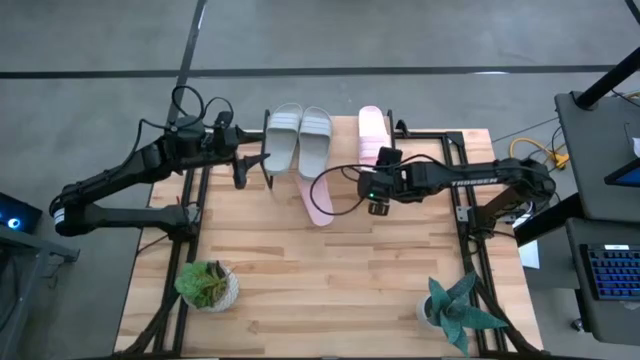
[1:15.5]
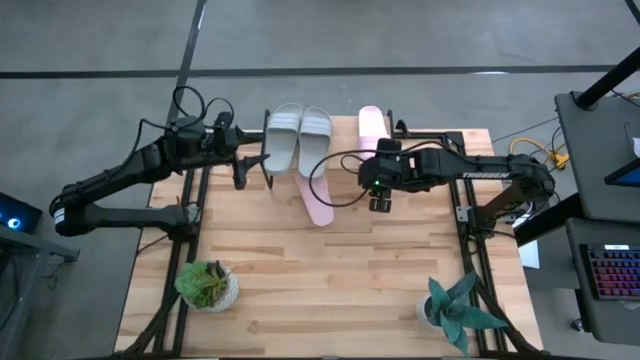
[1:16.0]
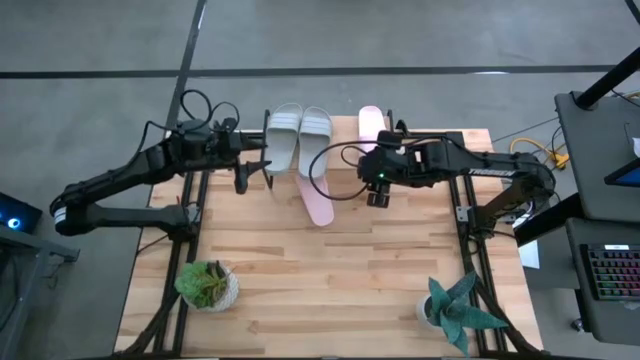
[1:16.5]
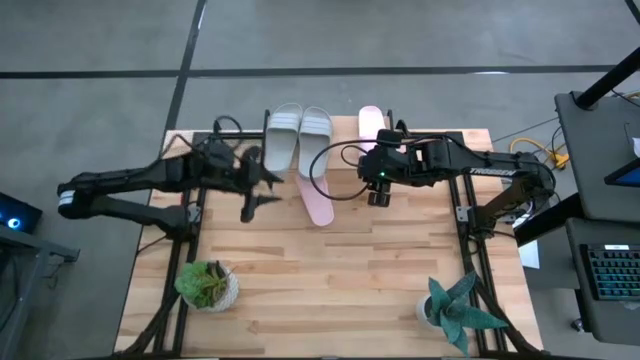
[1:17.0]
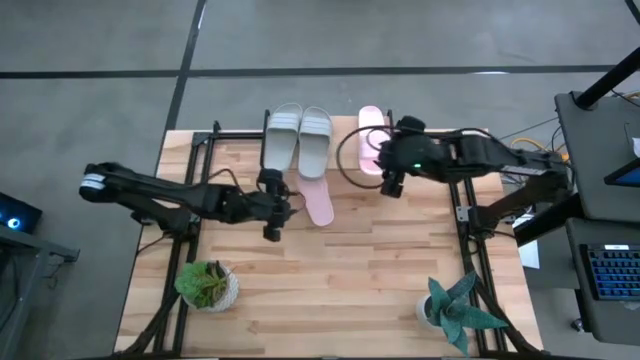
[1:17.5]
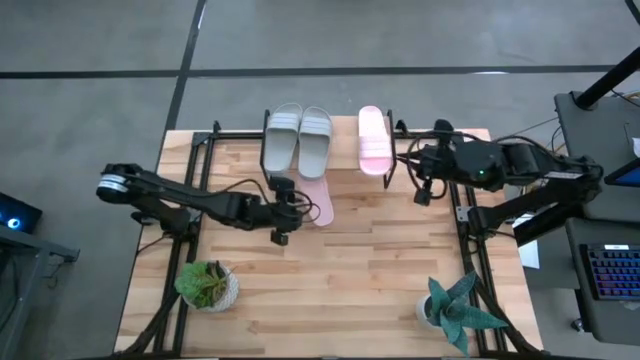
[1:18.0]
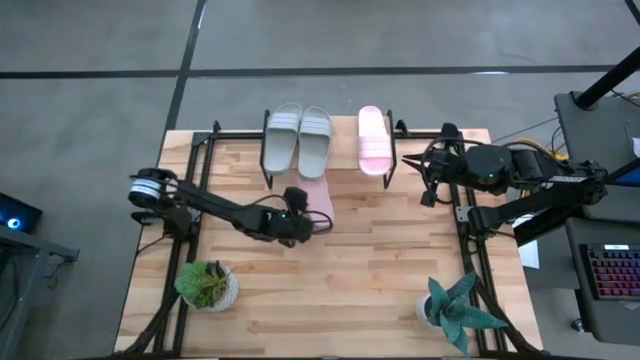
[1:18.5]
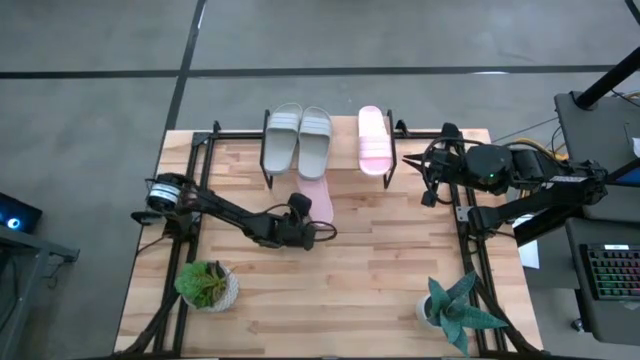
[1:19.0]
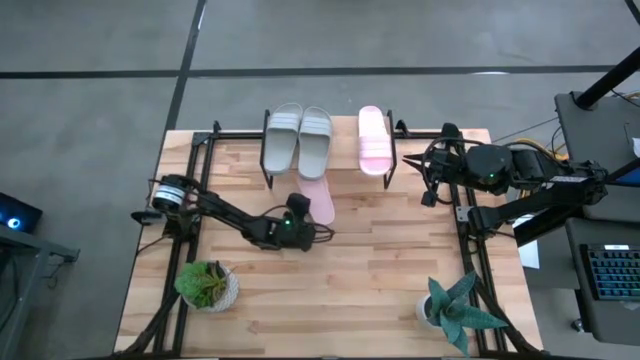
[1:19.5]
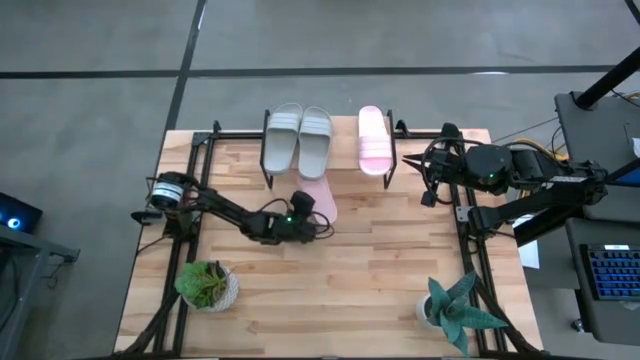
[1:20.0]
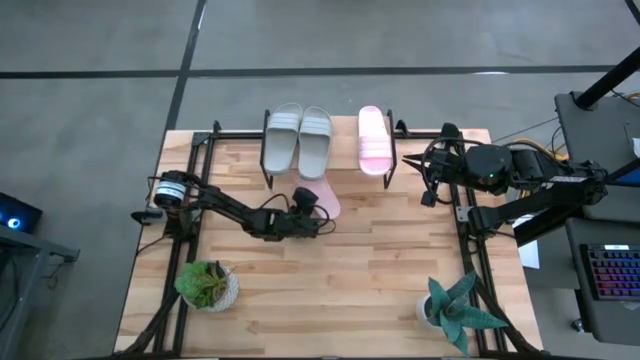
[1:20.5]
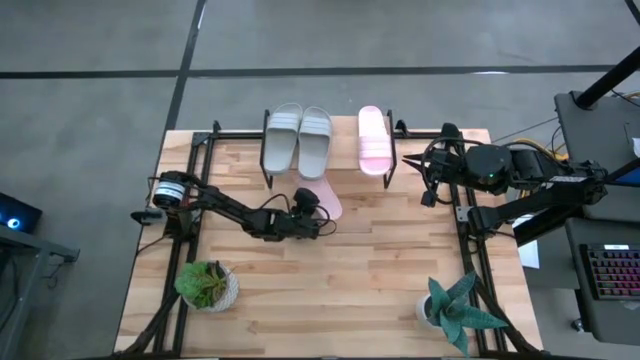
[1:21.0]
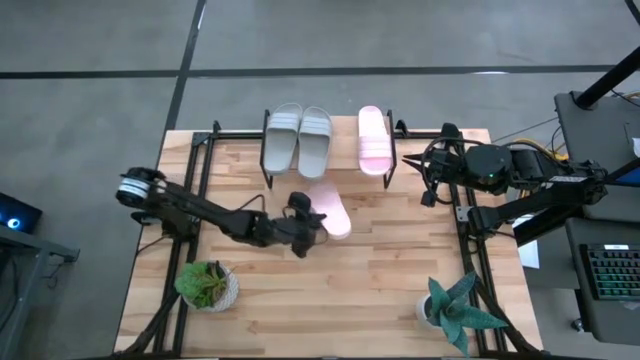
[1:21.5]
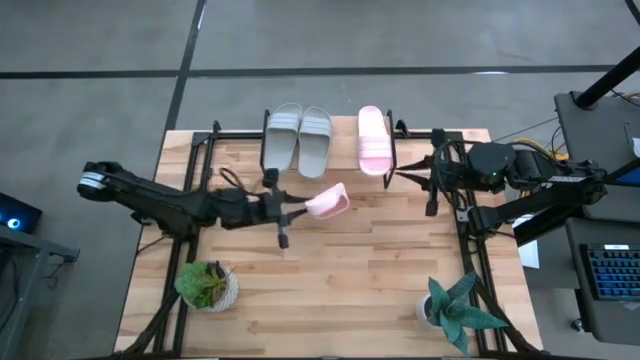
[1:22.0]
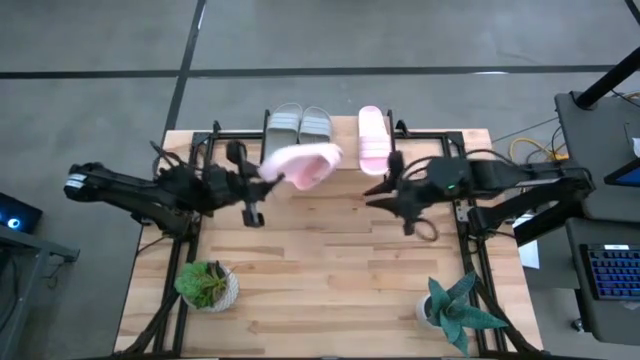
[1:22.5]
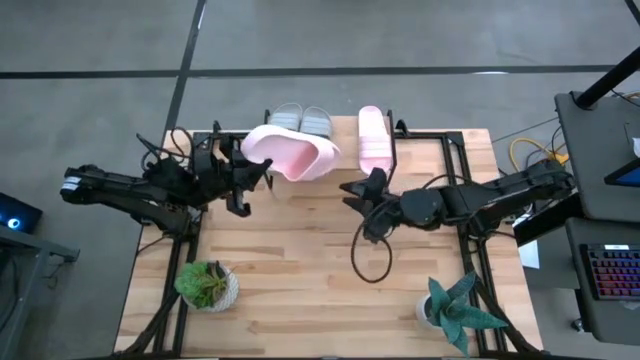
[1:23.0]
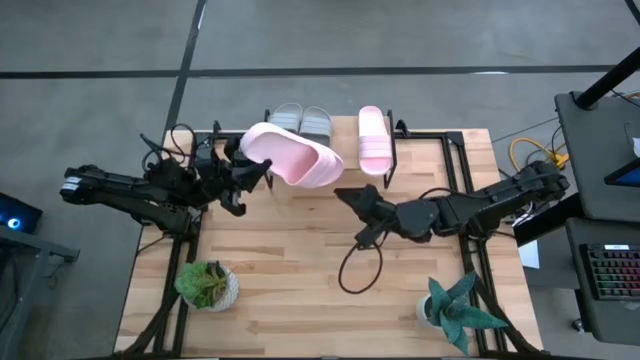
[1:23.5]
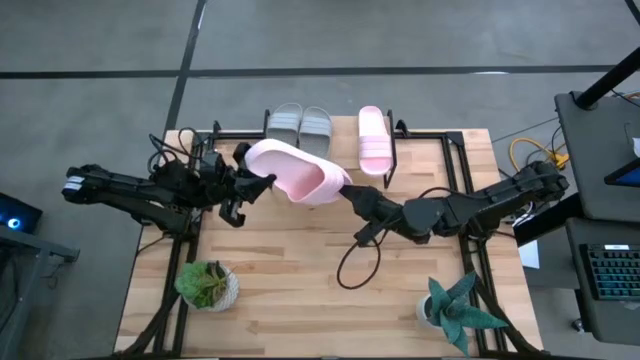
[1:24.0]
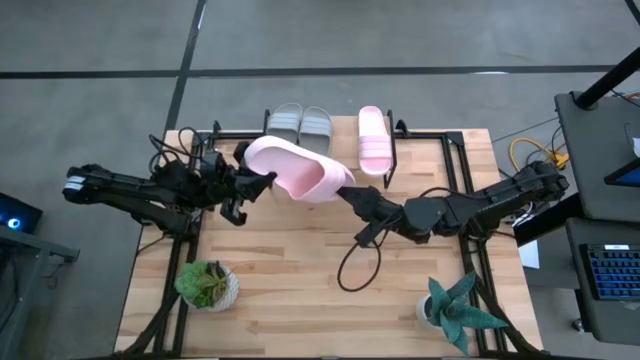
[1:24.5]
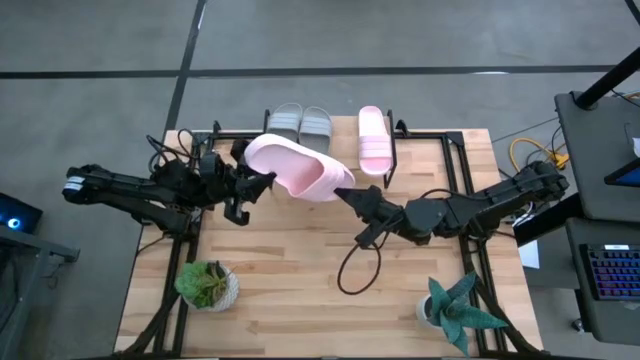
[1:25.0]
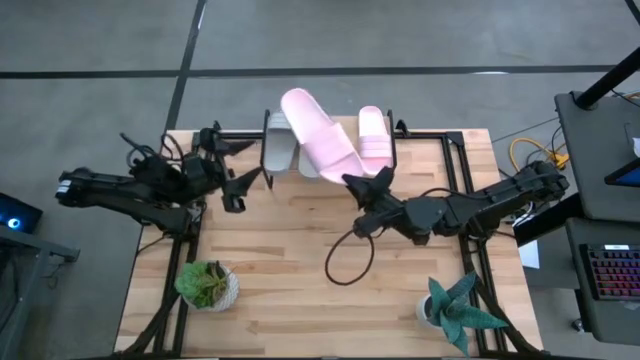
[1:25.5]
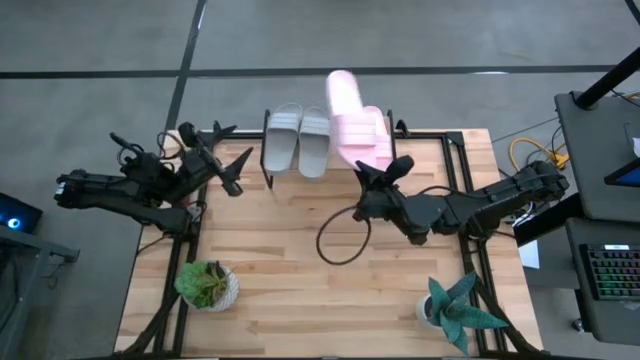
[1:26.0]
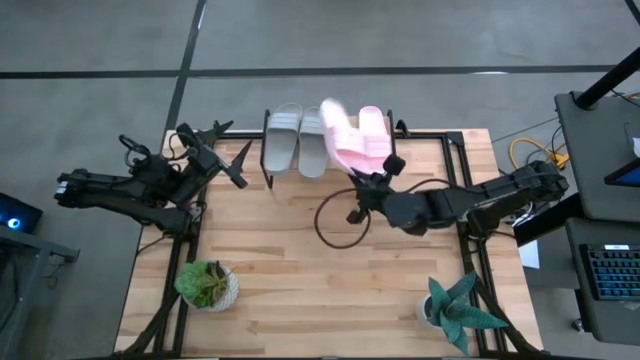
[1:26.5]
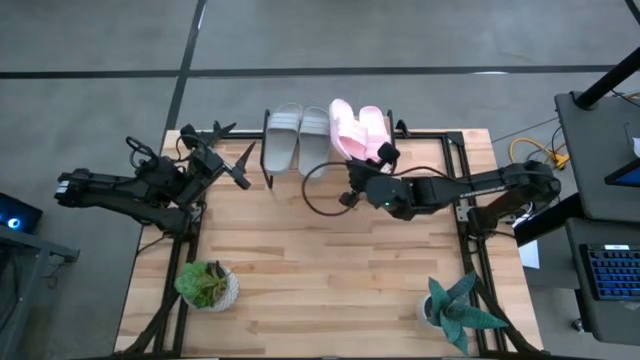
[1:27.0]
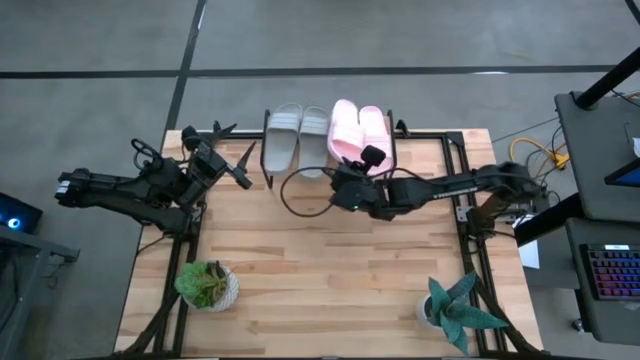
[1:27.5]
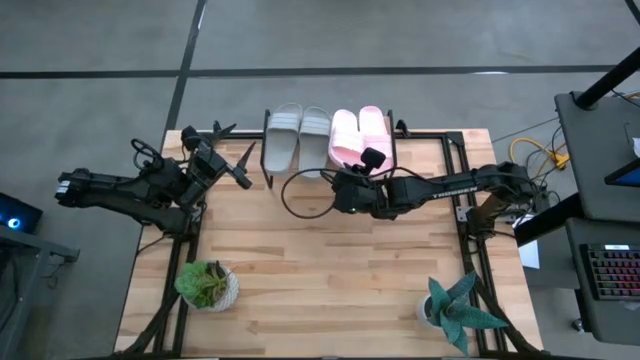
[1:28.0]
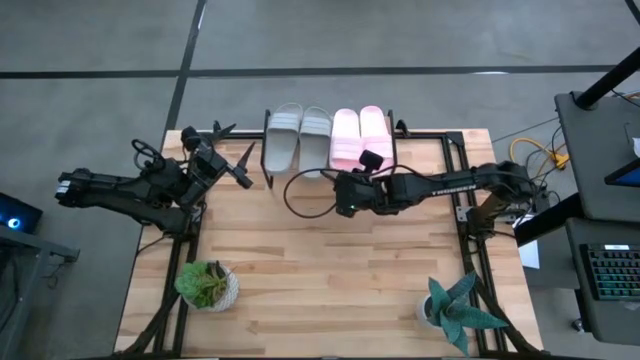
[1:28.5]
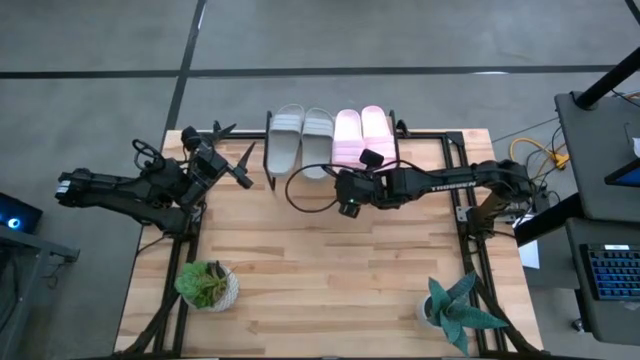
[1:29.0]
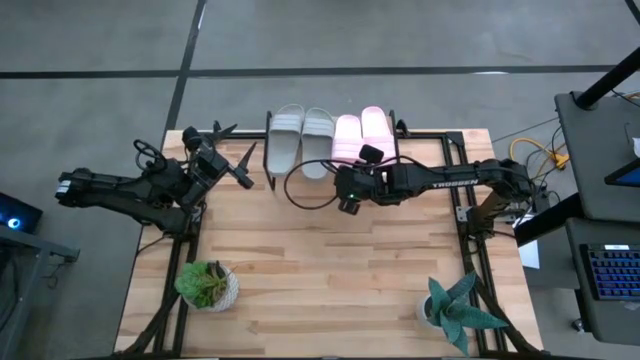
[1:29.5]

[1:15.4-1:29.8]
Task: Pick and place slides into the shelf
Put the pink slide on the shelf

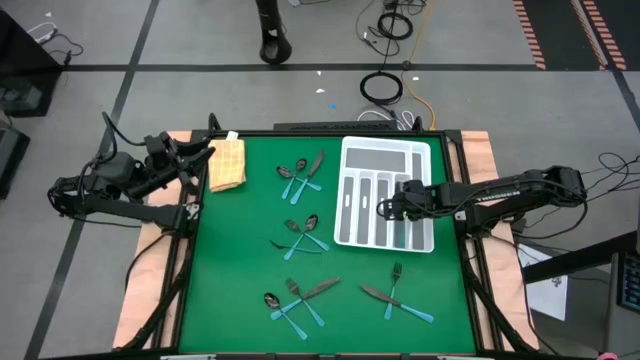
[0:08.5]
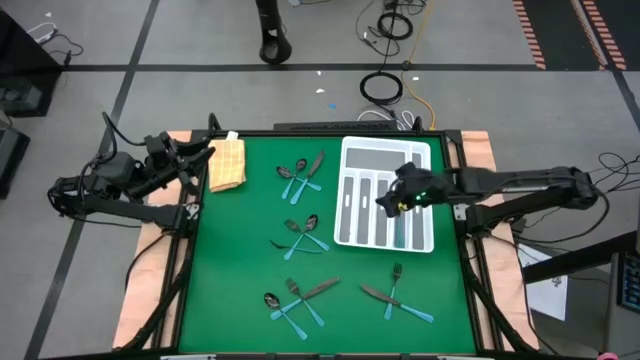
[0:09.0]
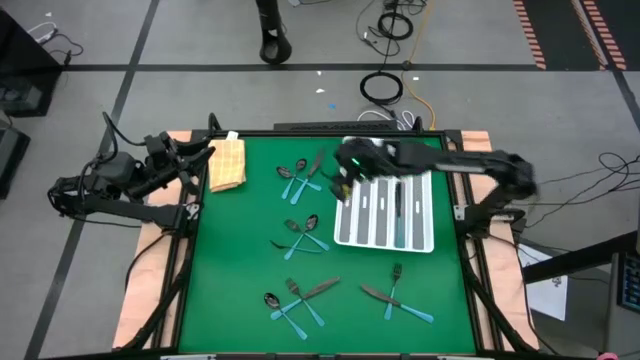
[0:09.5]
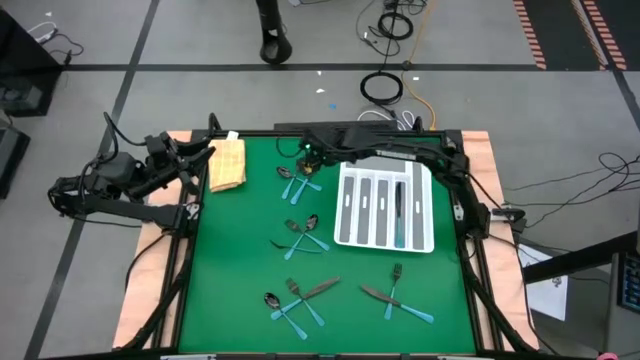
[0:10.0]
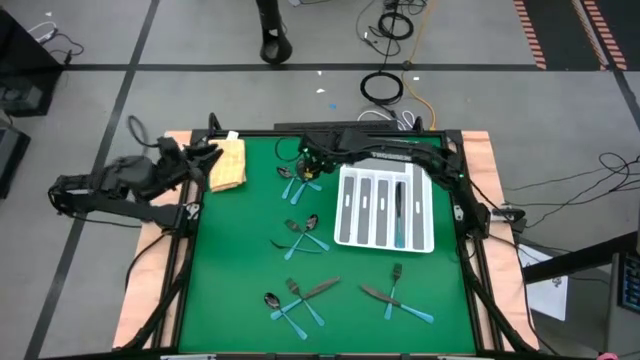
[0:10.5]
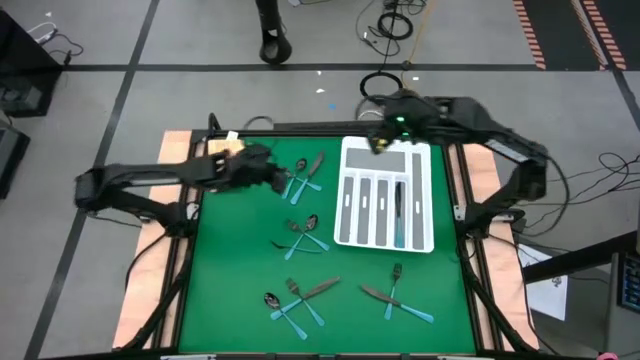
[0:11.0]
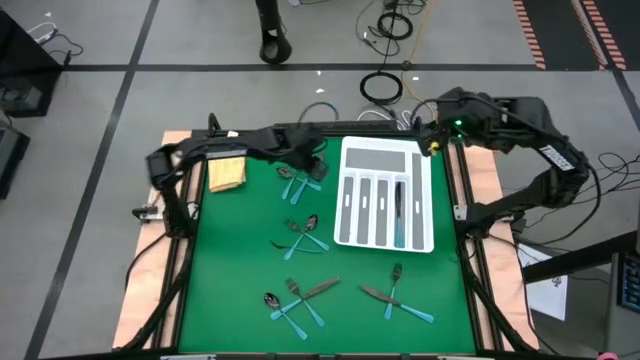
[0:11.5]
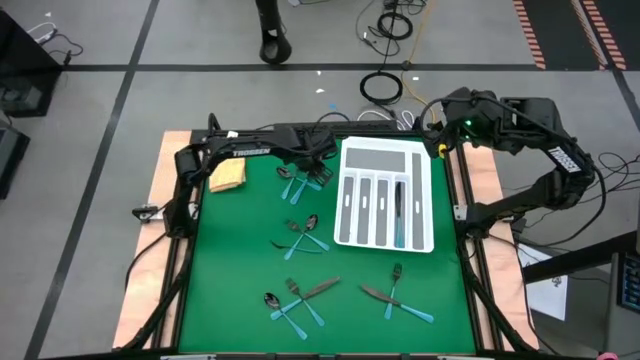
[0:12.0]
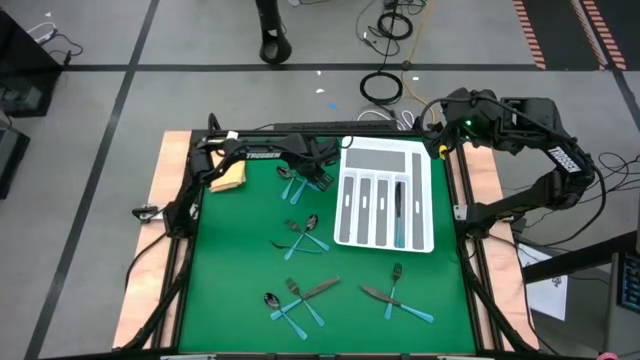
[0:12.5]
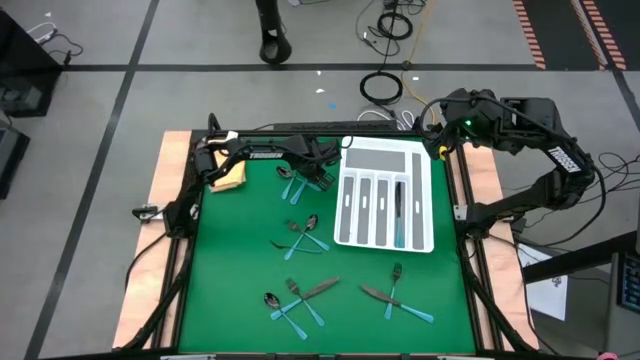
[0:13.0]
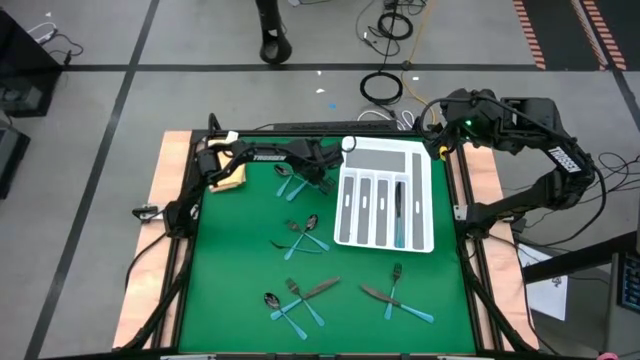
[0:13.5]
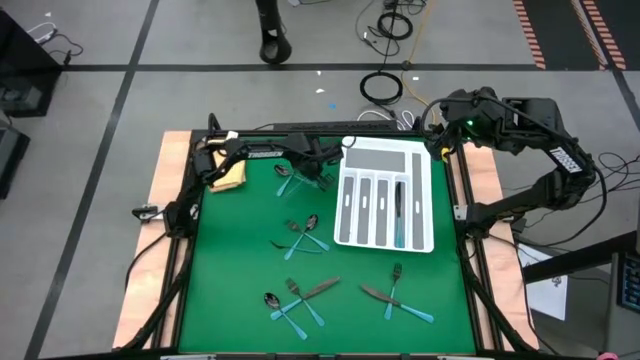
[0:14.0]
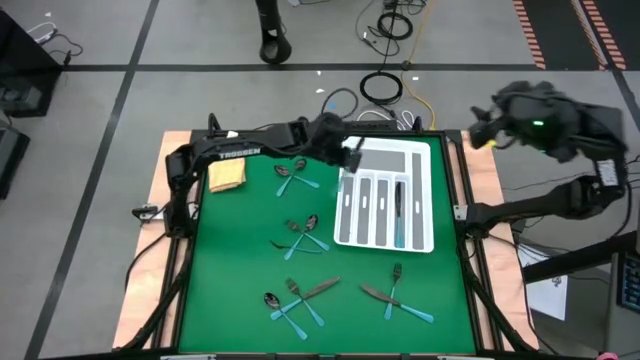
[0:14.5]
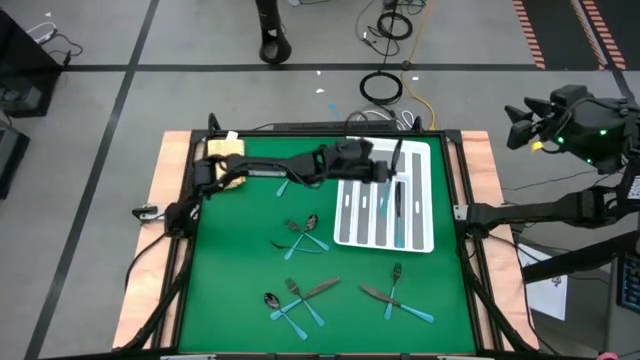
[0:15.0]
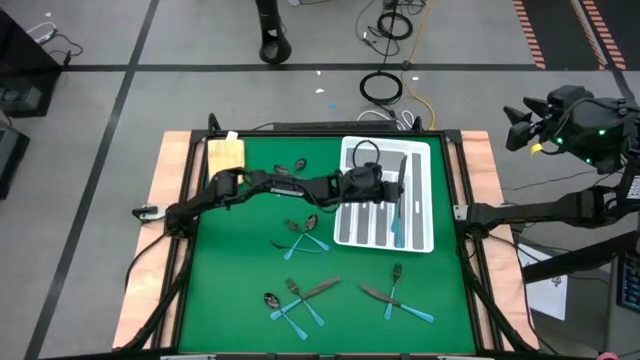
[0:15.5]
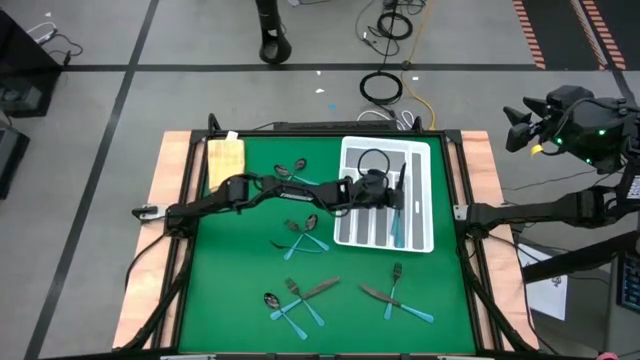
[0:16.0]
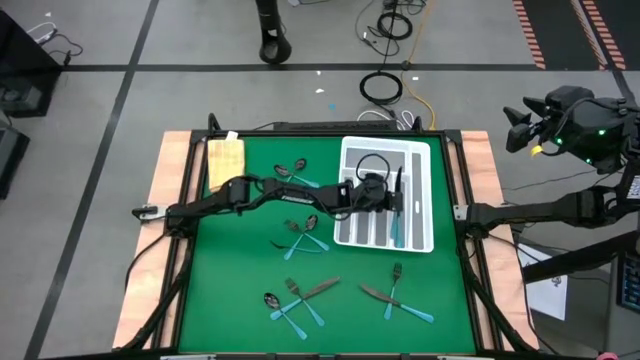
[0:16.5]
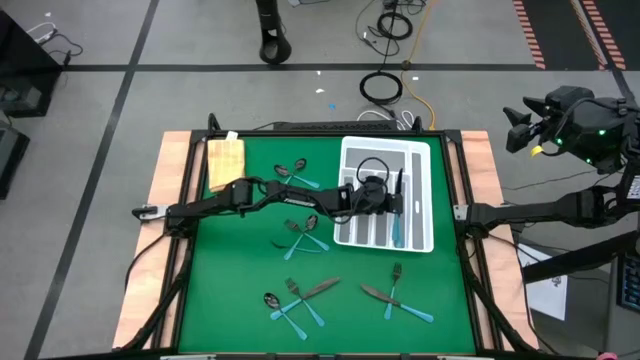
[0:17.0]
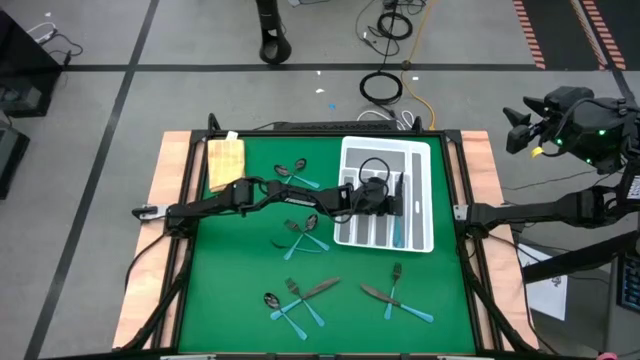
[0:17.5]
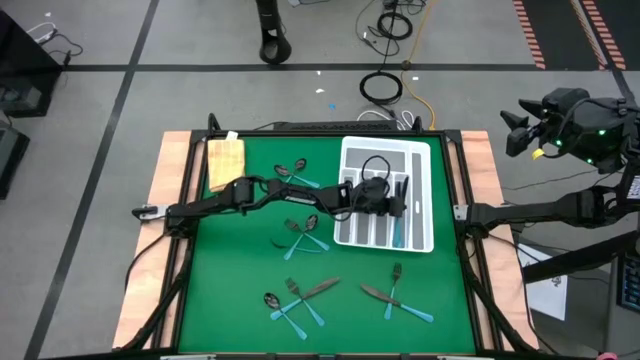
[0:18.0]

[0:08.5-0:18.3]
Task: Sort silverware
Put the blue table knife into the silverware tray with the other blue table knife
